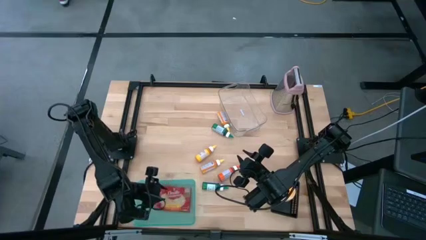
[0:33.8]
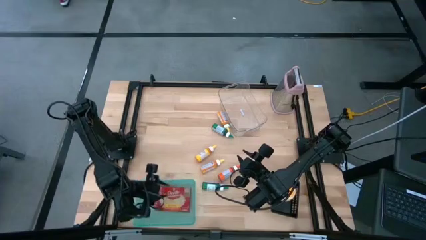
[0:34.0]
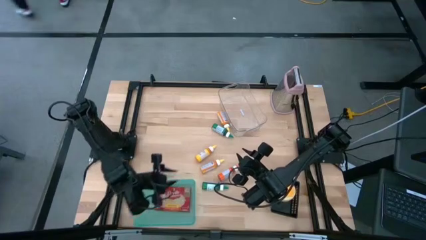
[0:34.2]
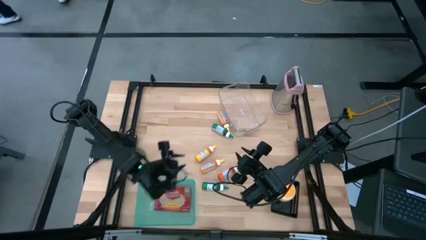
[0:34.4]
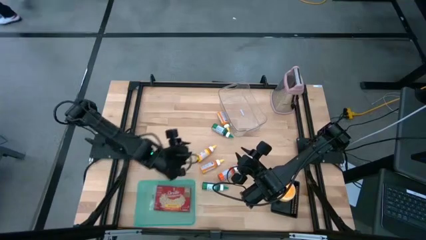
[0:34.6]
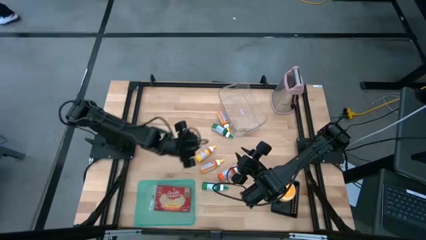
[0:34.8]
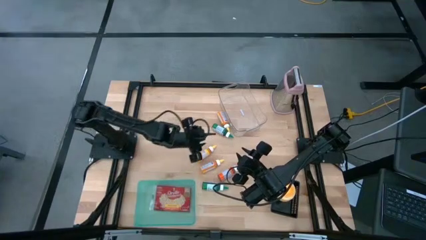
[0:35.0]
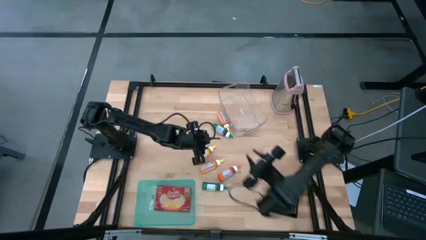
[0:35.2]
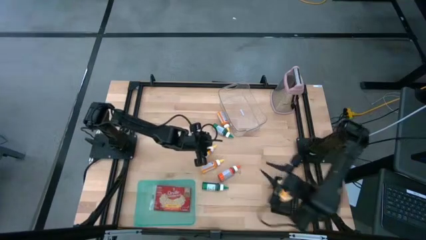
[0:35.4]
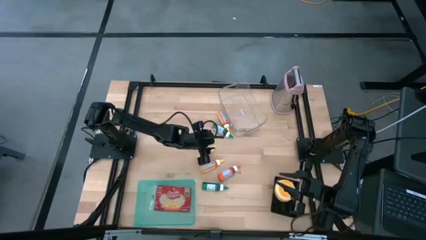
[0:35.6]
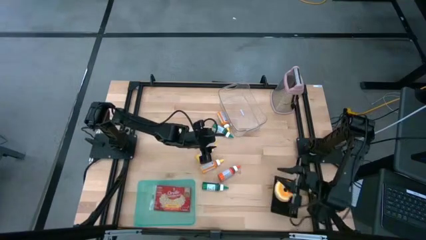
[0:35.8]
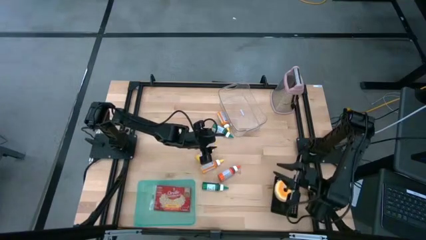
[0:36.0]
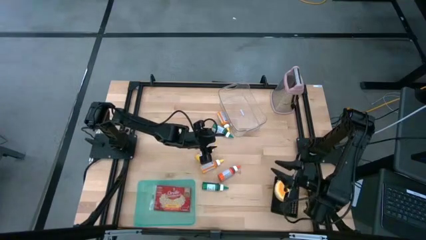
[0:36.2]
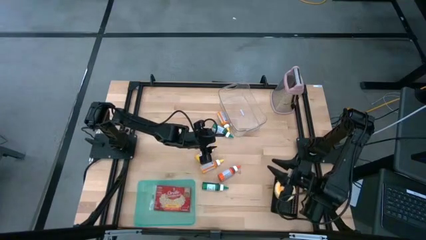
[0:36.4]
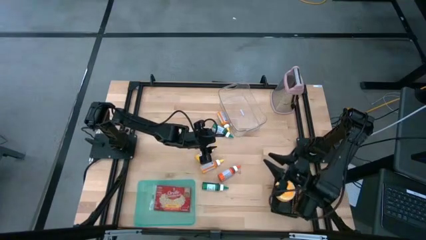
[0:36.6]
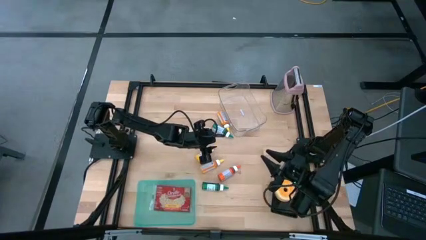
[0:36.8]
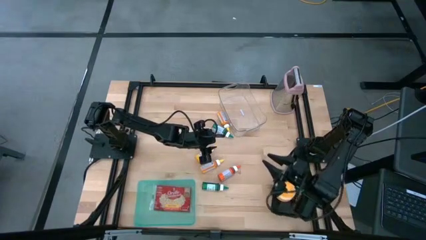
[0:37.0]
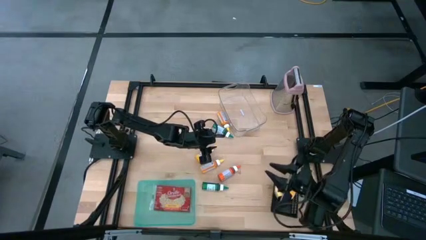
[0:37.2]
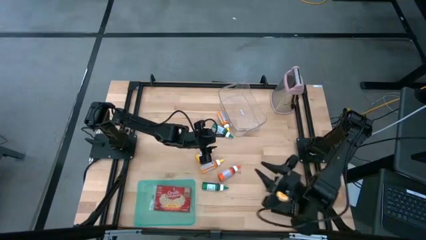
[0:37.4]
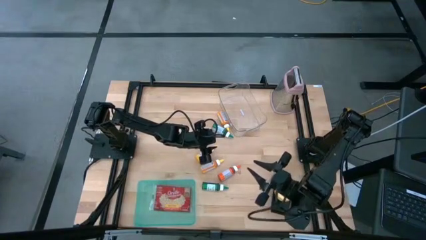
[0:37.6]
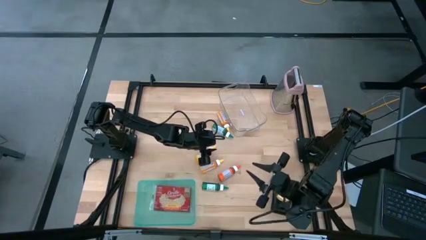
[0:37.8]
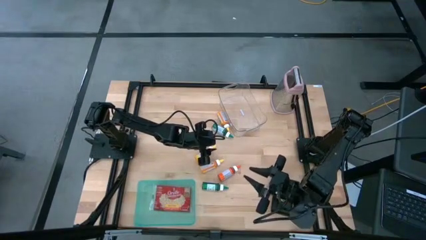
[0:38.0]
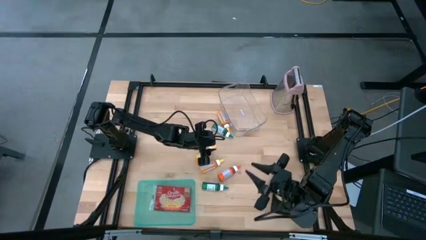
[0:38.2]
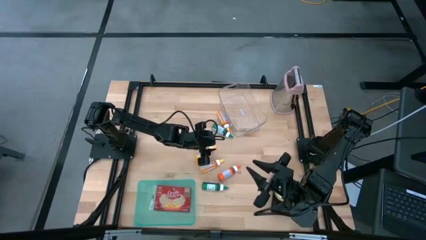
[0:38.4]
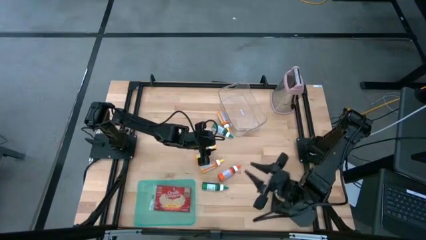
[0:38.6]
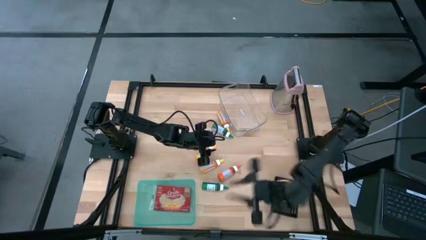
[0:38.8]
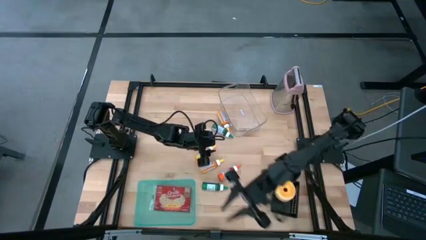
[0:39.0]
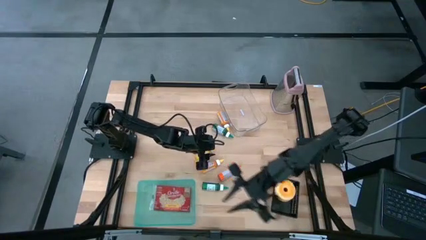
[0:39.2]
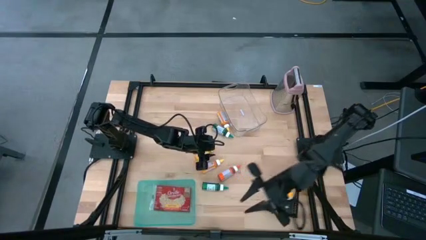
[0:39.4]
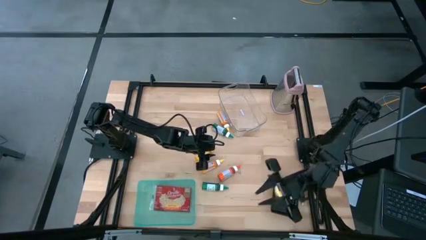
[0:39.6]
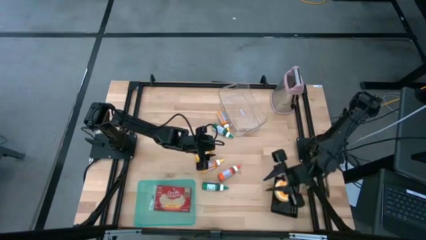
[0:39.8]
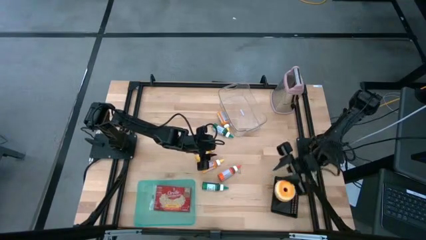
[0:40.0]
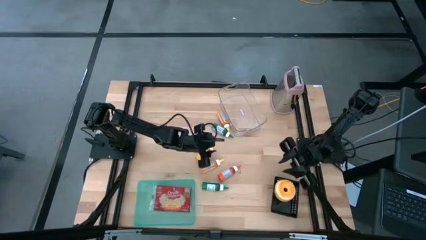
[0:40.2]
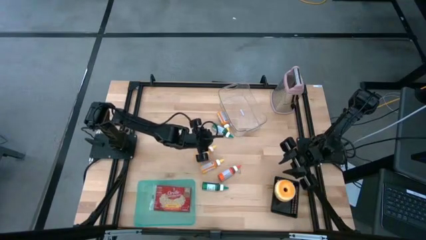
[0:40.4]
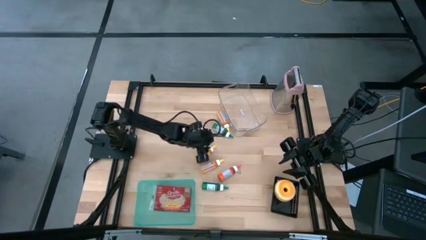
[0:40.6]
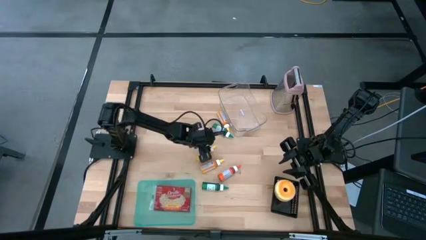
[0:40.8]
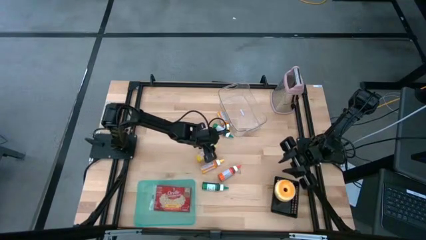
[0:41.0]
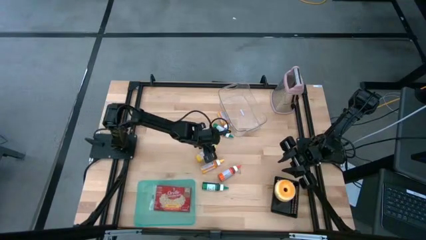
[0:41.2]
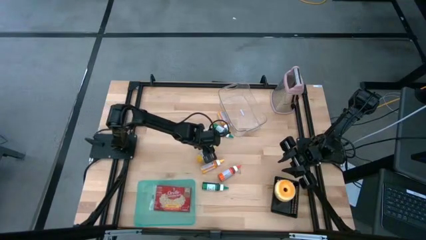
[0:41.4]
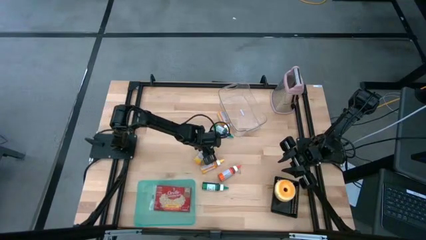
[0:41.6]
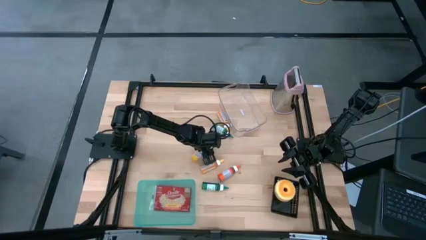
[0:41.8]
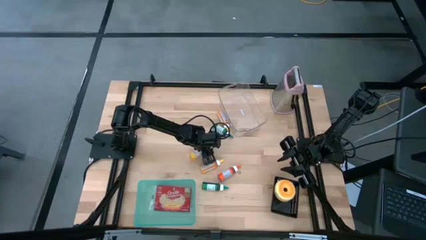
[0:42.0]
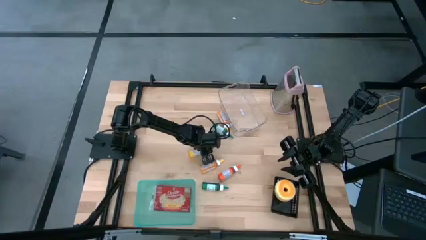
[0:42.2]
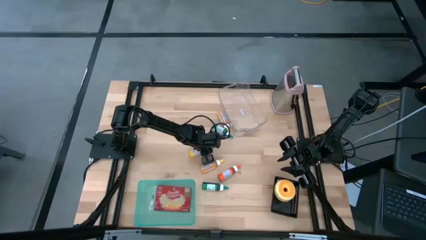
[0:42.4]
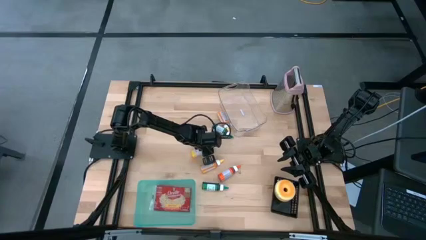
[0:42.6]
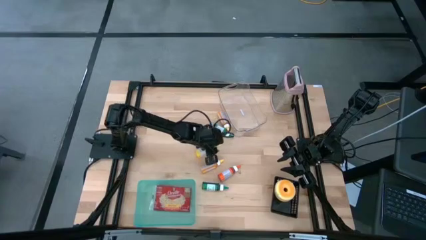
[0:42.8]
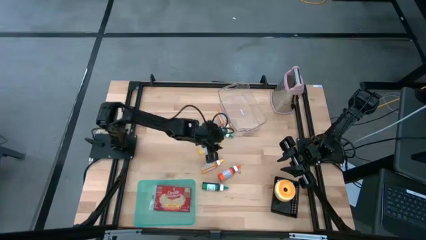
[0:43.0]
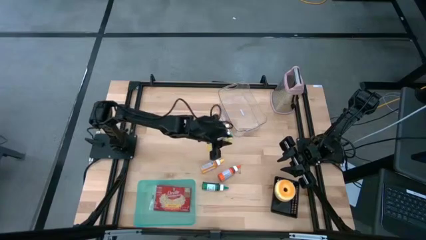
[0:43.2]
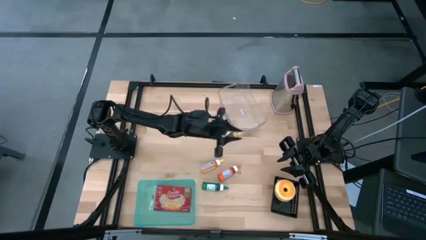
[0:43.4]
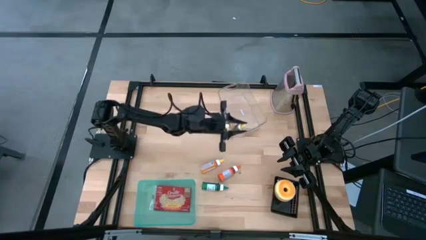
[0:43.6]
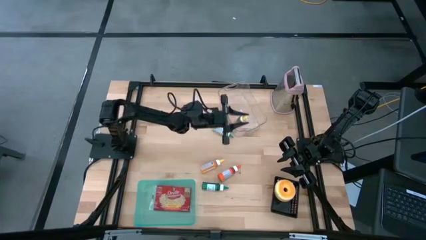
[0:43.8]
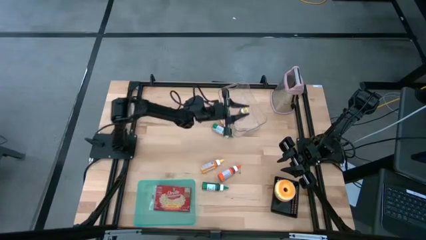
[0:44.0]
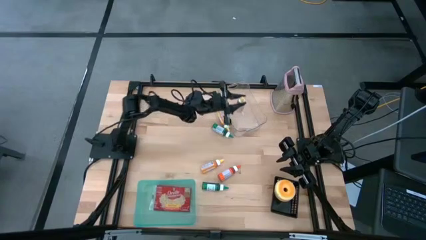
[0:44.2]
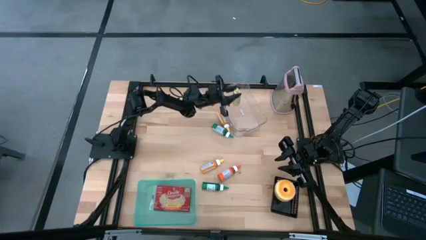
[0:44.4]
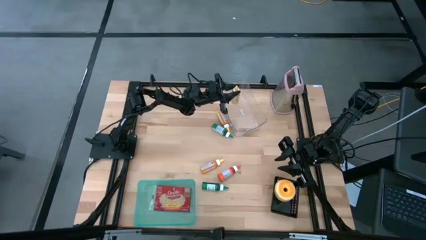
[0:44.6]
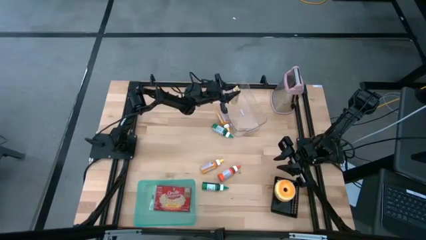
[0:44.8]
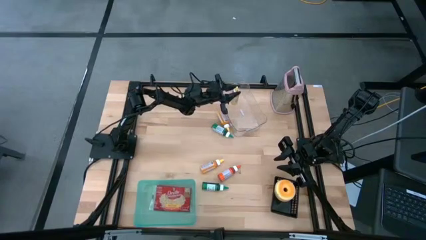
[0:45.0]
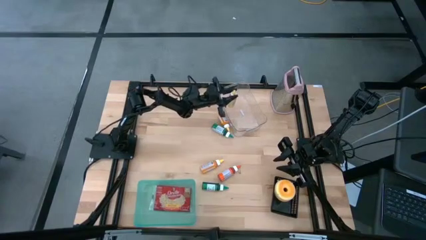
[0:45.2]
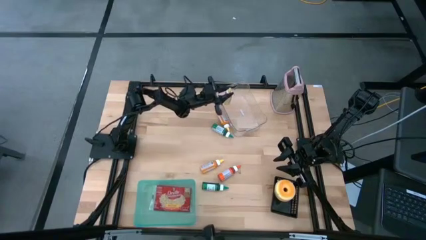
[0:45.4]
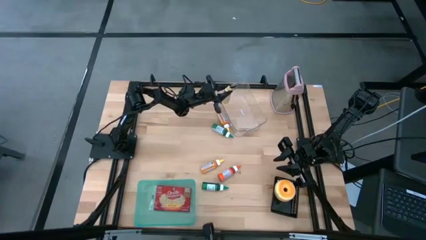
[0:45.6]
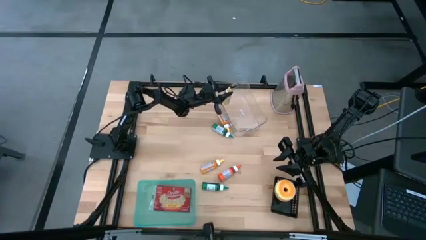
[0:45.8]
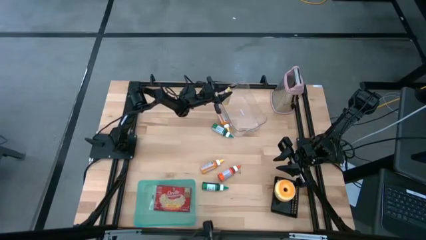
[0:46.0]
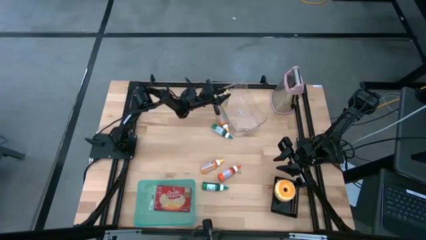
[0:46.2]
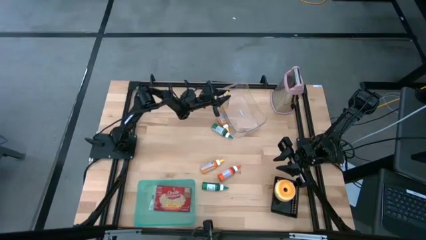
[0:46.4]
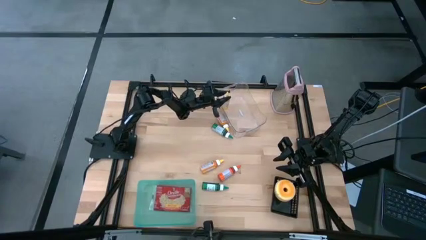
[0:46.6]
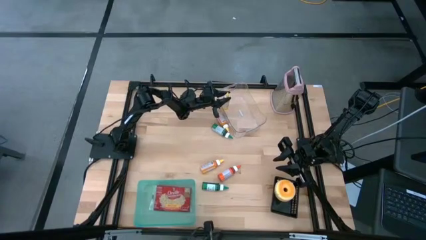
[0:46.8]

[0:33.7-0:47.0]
Task: Pick & Place Food Item
Put the middle orange food coloring into the transparent bin

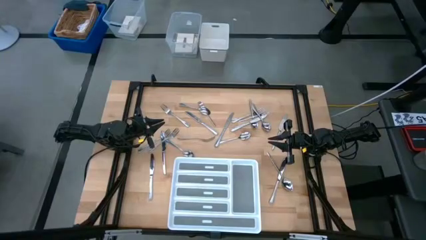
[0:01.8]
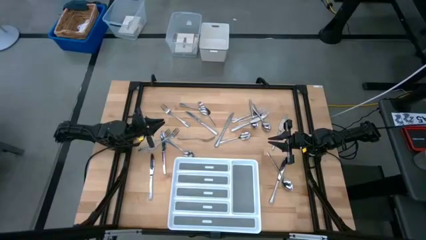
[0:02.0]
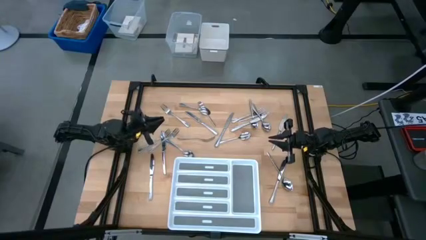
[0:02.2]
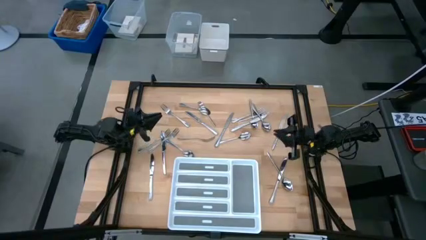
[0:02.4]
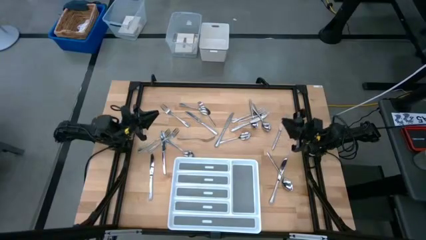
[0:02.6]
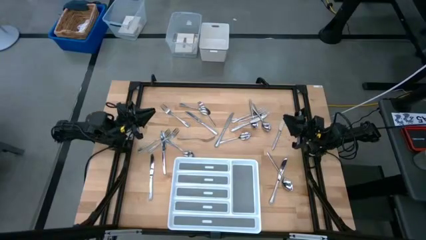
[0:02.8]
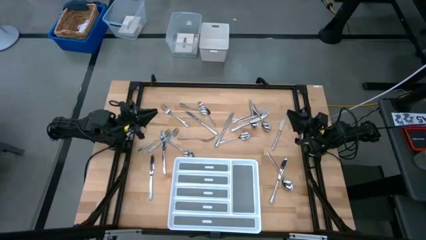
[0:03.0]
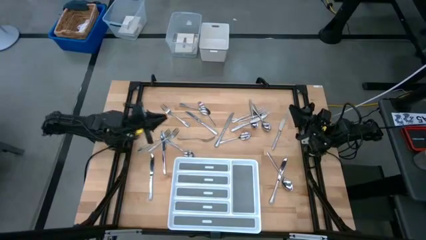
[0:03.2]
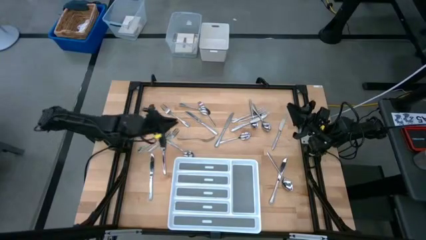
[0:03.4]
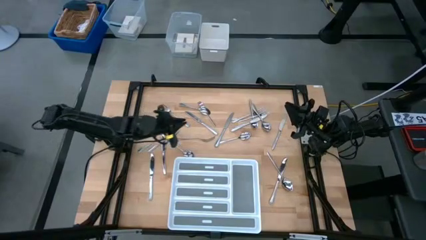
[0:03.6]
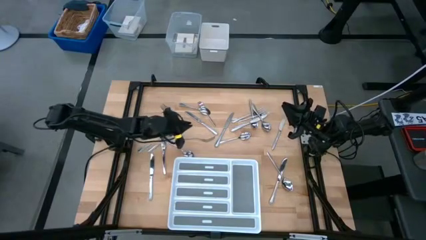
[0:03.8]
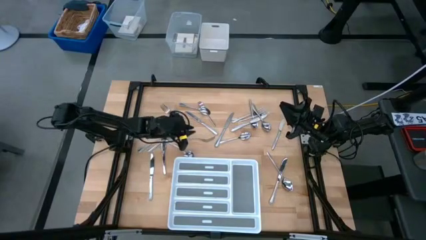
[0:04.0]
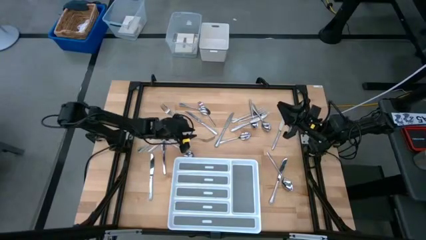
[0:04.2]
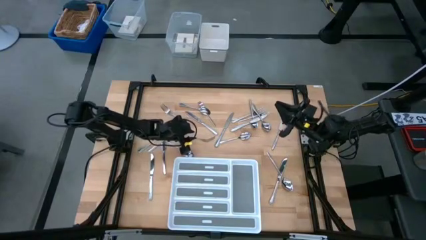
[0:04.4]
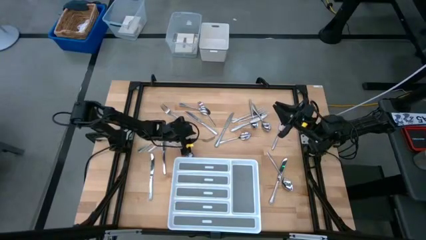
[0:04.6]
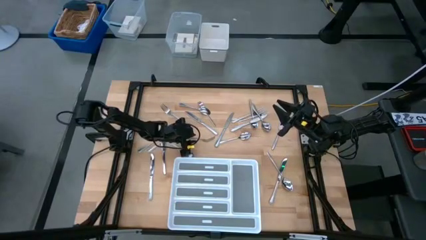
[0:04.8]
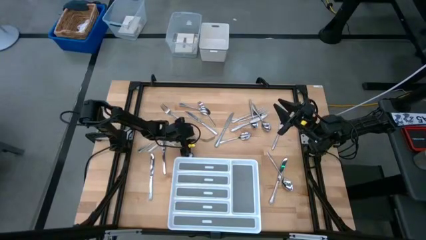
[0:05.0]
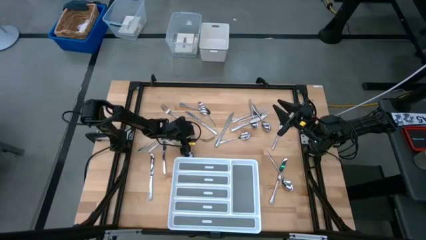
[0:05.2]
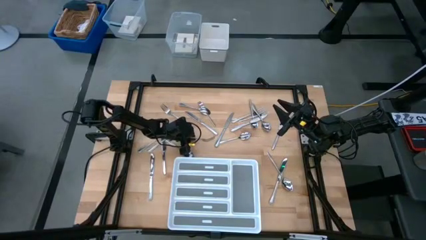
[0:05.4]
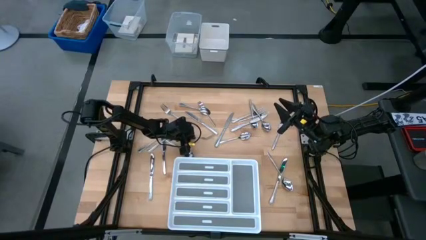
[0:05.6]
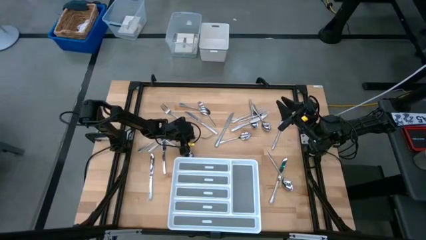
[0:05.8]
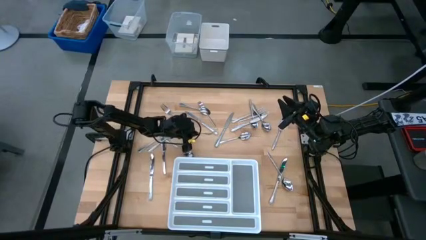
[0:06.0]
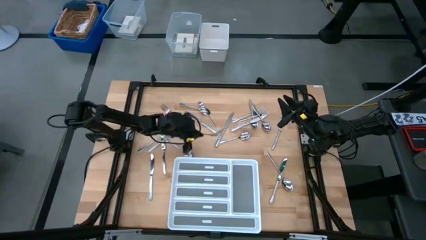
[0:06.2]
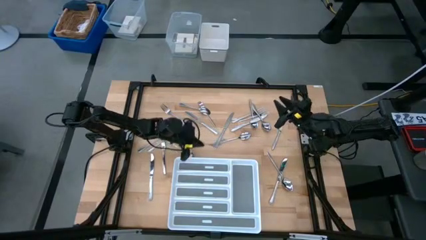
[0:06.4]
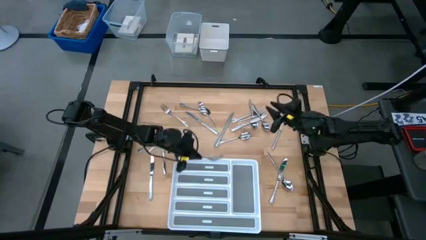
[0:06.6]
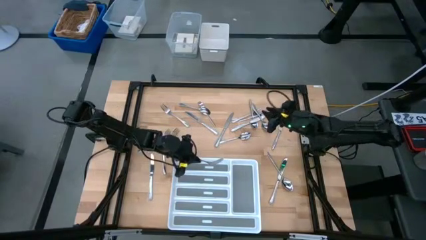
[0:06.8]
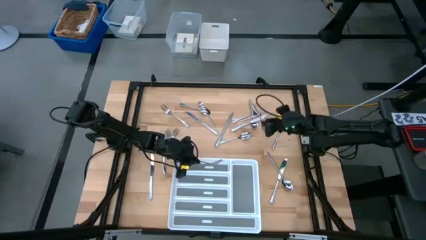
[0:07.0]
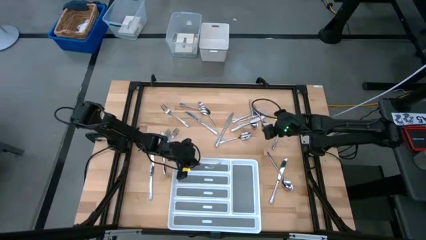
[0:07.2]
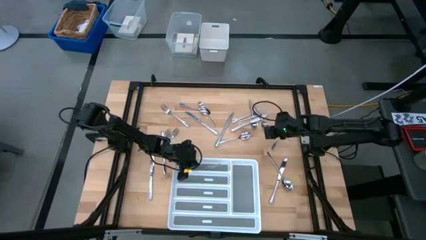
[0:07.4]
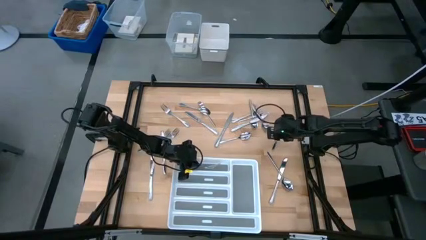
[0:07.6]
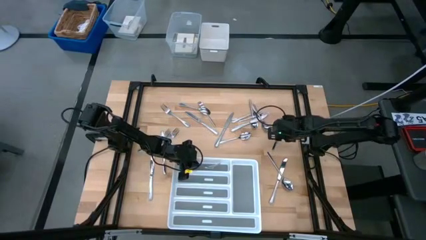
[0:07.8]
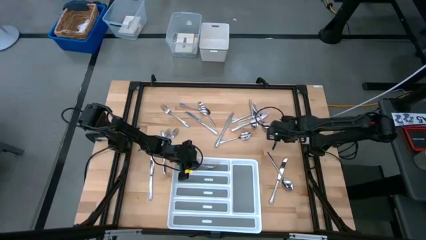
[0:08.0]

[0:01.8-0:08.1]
Task: Sort silverware
Put the silver fork into the top section of the white silverware tray
